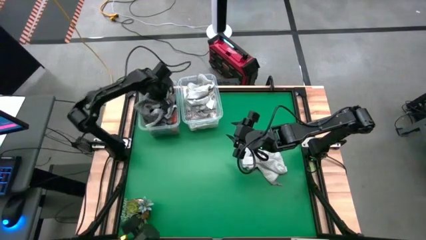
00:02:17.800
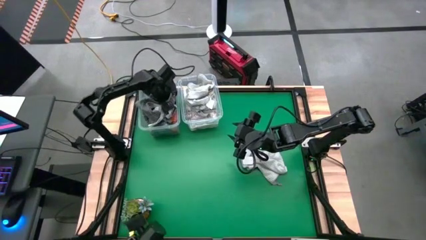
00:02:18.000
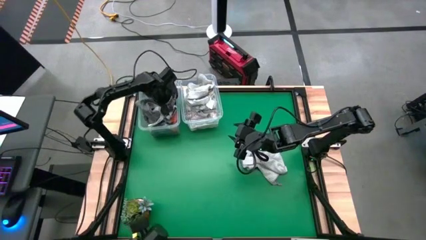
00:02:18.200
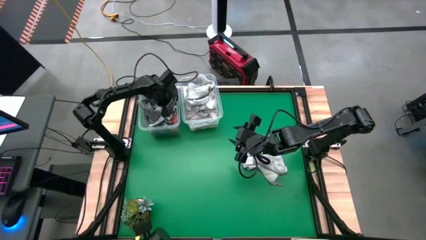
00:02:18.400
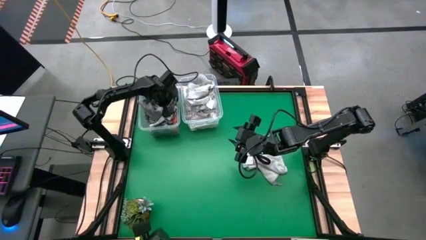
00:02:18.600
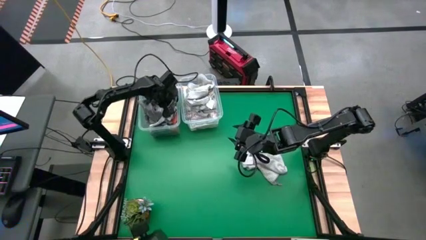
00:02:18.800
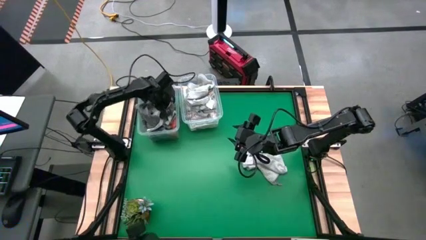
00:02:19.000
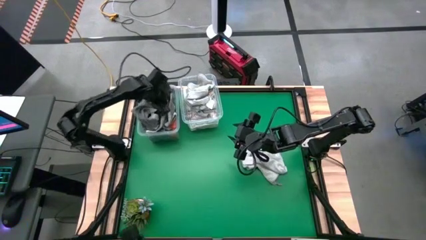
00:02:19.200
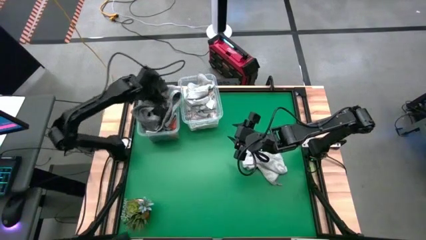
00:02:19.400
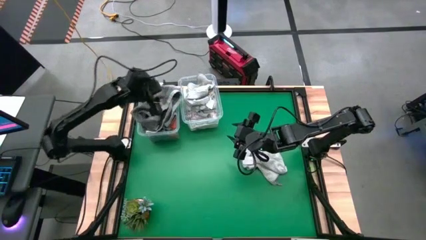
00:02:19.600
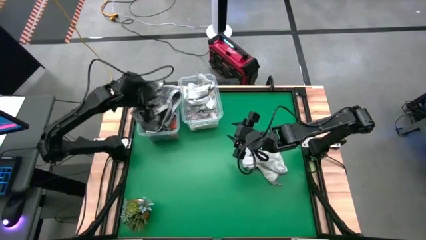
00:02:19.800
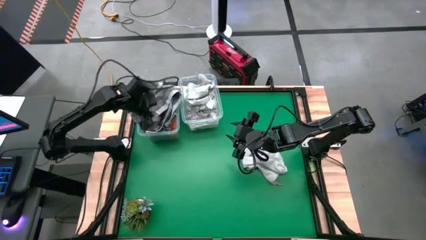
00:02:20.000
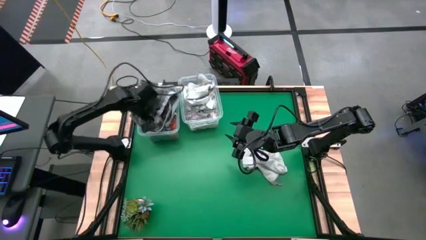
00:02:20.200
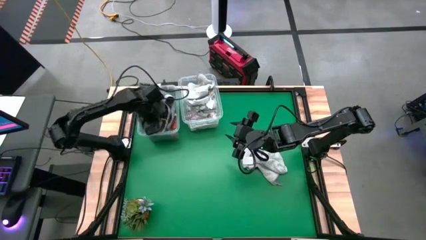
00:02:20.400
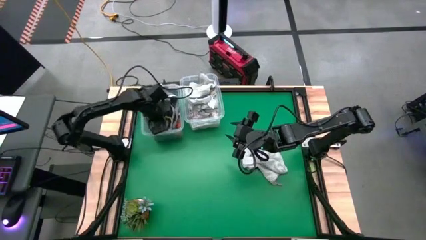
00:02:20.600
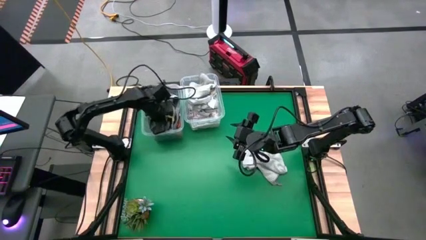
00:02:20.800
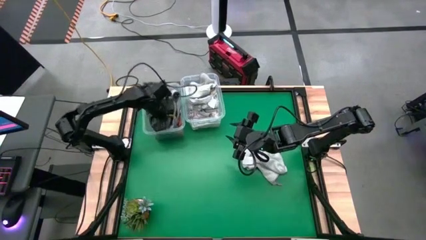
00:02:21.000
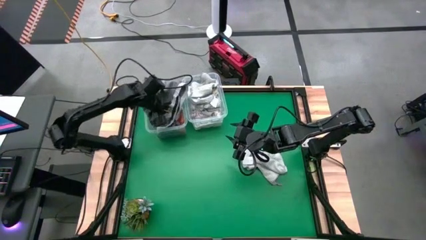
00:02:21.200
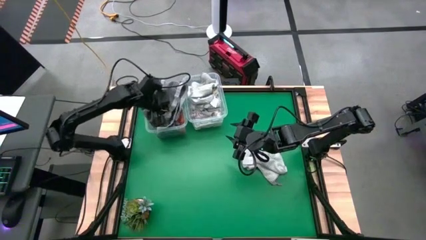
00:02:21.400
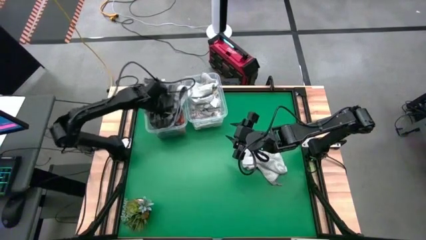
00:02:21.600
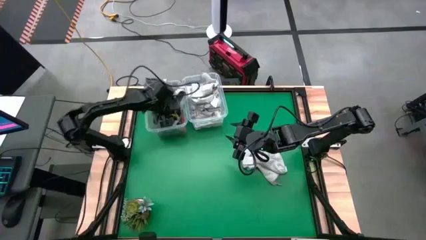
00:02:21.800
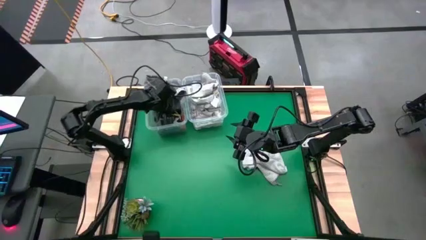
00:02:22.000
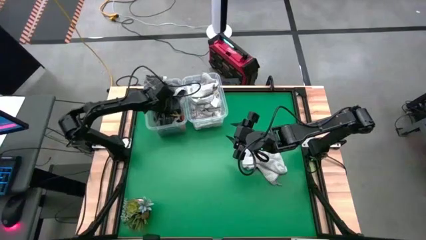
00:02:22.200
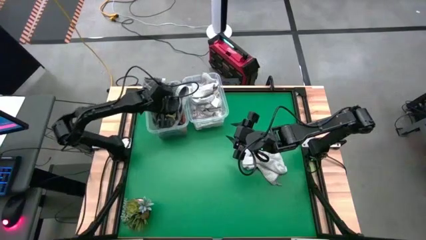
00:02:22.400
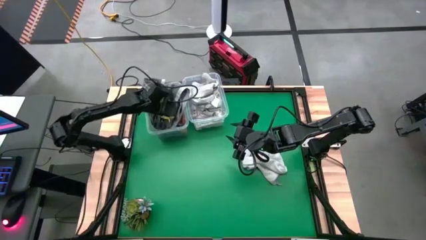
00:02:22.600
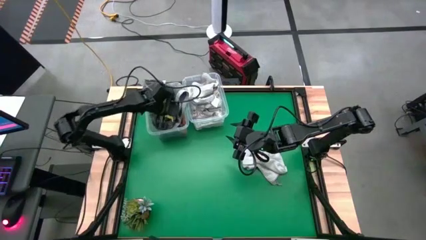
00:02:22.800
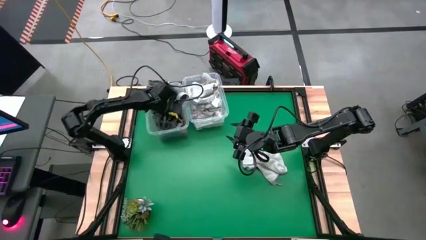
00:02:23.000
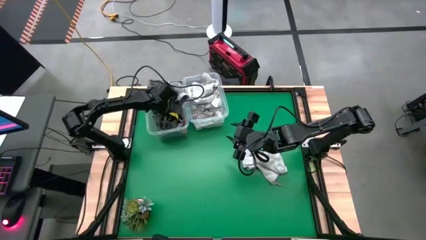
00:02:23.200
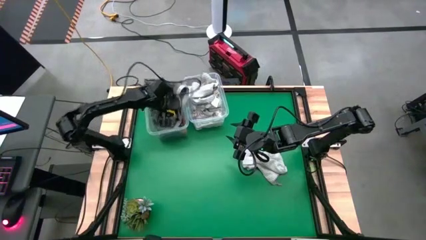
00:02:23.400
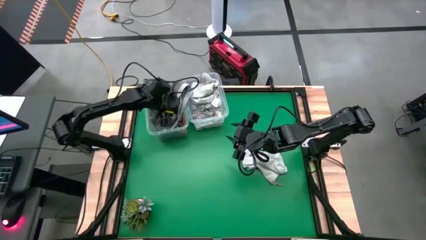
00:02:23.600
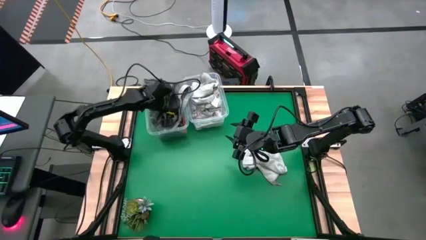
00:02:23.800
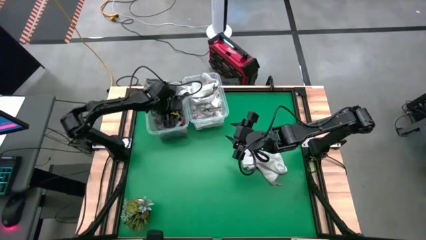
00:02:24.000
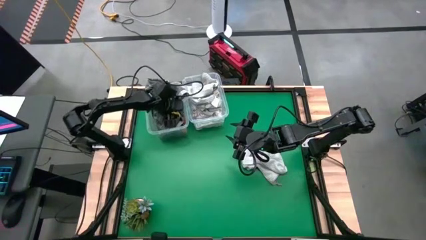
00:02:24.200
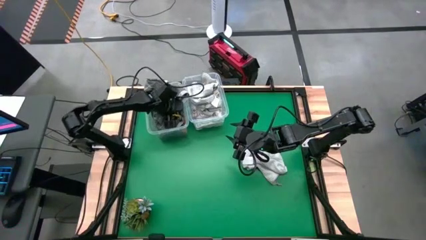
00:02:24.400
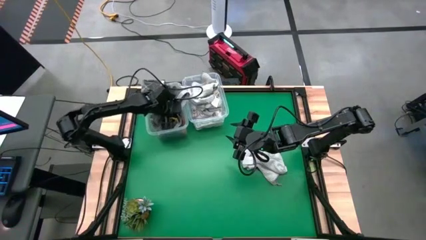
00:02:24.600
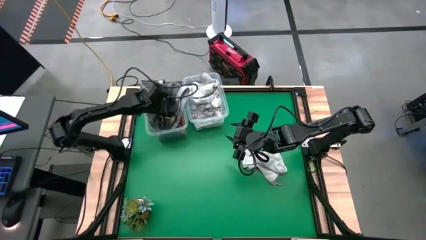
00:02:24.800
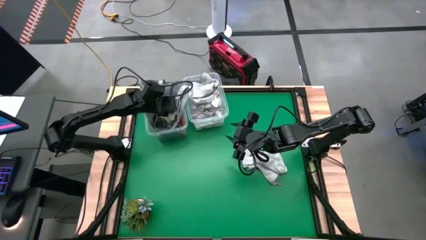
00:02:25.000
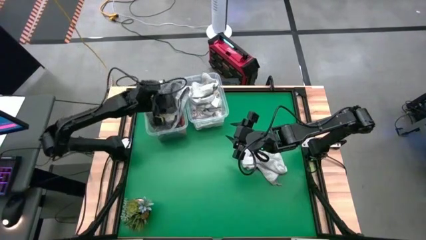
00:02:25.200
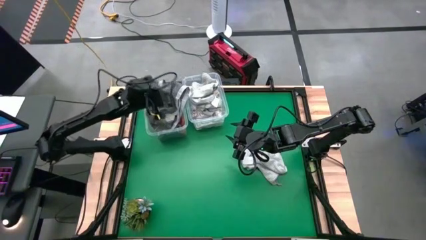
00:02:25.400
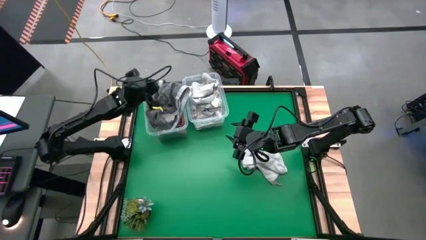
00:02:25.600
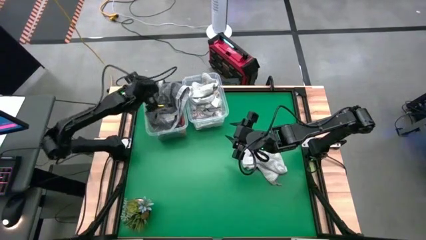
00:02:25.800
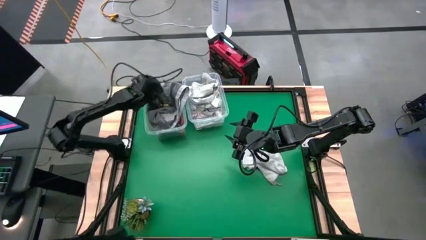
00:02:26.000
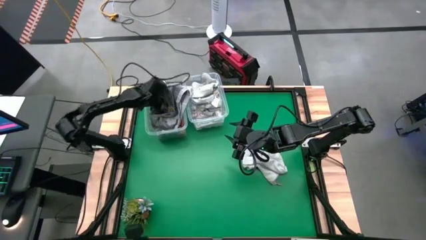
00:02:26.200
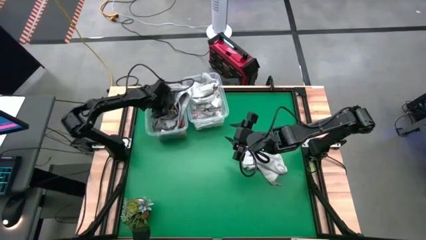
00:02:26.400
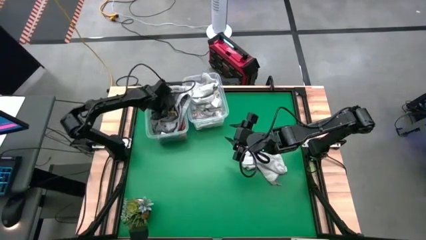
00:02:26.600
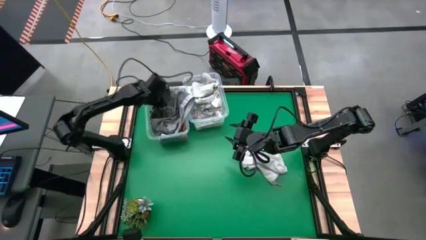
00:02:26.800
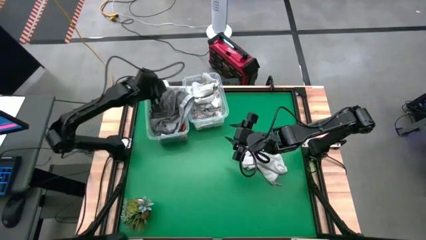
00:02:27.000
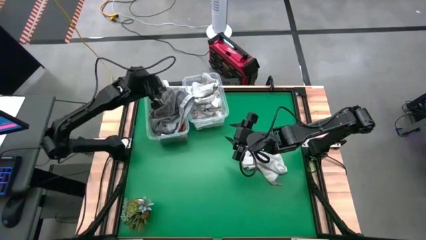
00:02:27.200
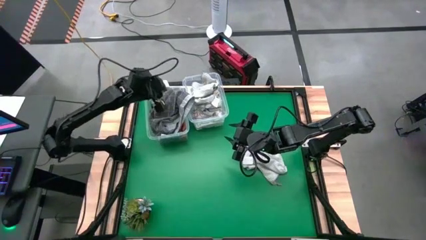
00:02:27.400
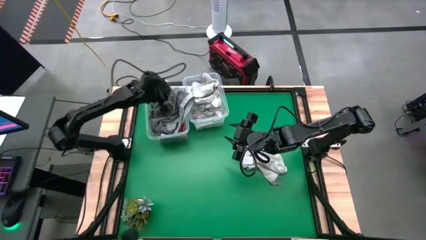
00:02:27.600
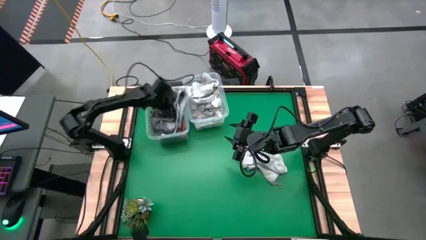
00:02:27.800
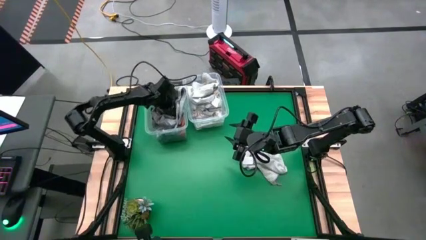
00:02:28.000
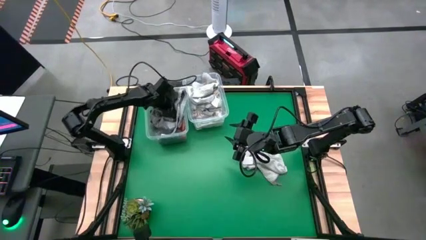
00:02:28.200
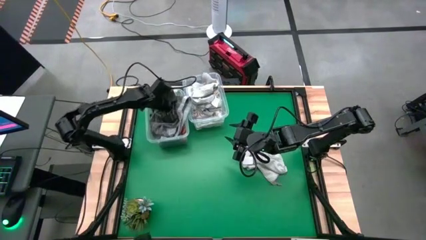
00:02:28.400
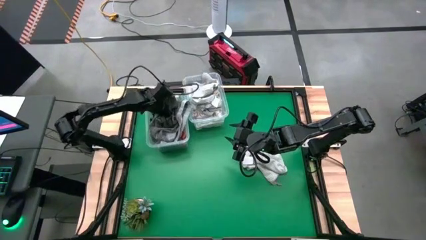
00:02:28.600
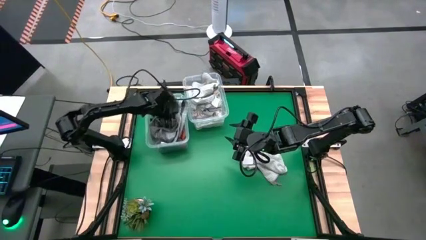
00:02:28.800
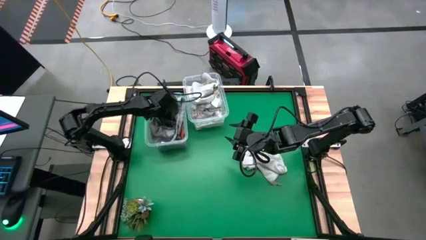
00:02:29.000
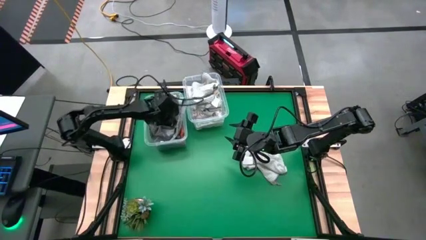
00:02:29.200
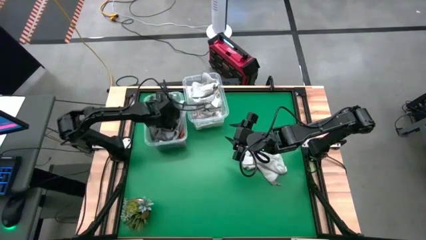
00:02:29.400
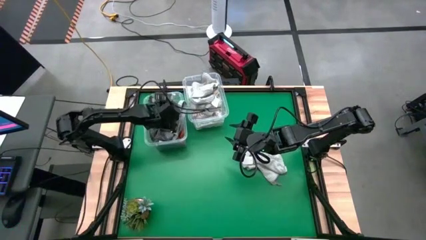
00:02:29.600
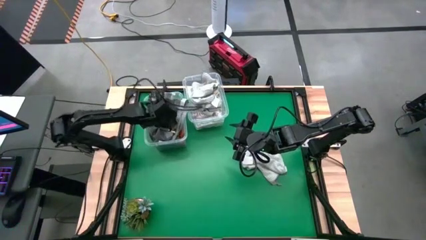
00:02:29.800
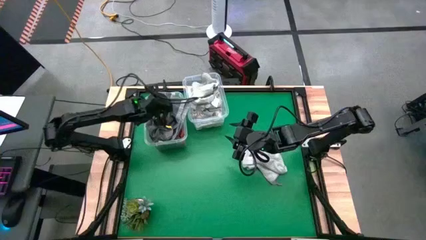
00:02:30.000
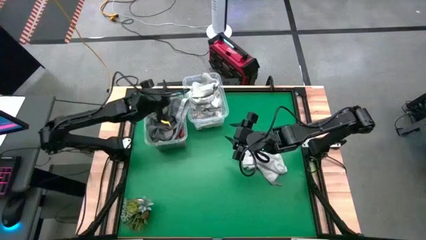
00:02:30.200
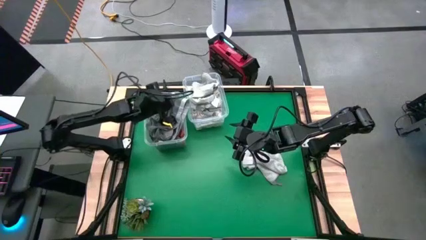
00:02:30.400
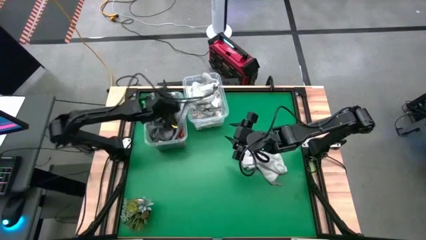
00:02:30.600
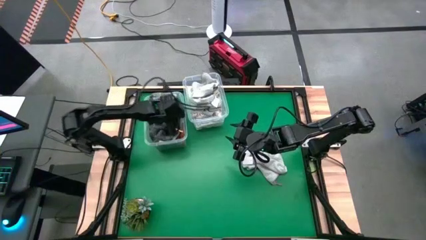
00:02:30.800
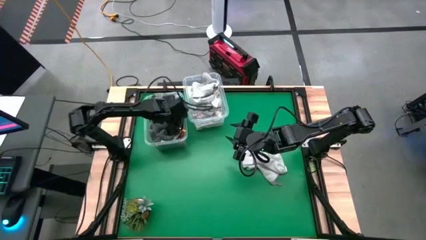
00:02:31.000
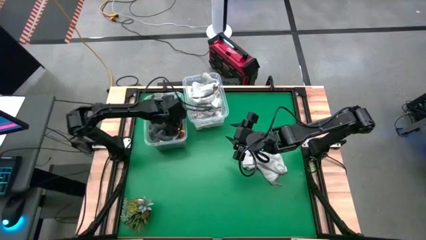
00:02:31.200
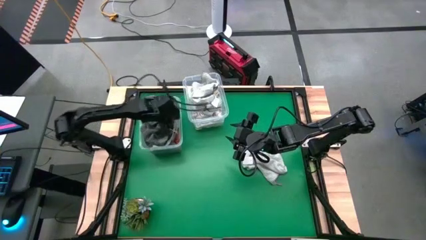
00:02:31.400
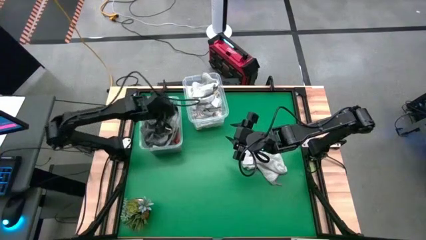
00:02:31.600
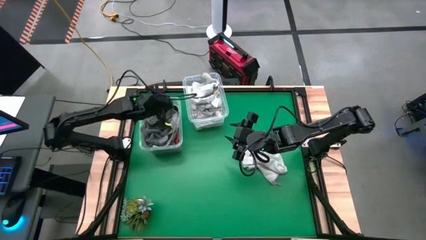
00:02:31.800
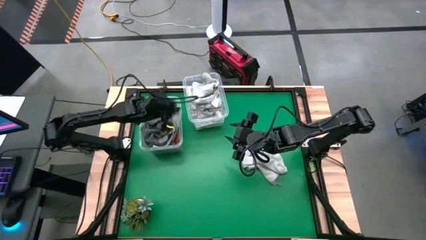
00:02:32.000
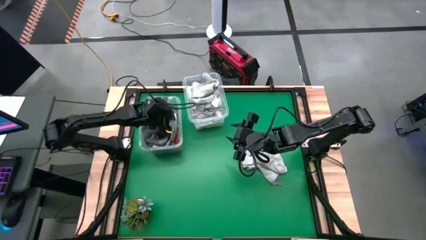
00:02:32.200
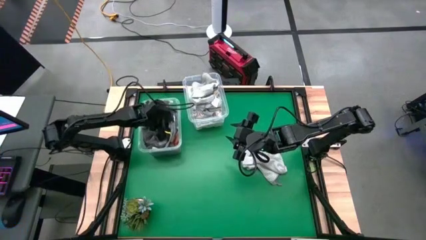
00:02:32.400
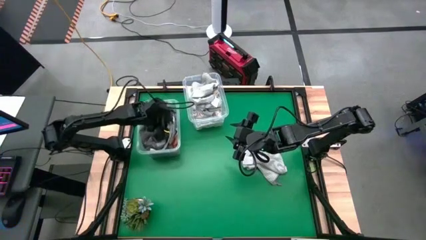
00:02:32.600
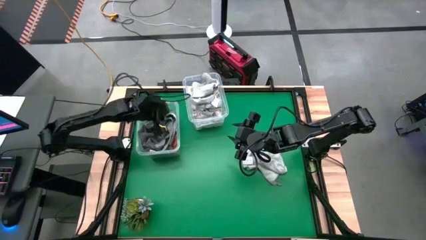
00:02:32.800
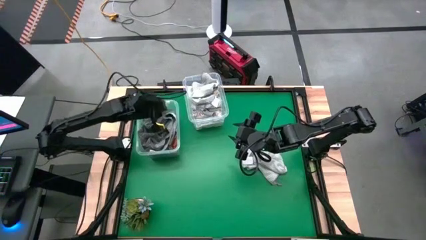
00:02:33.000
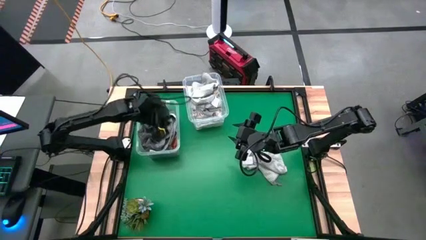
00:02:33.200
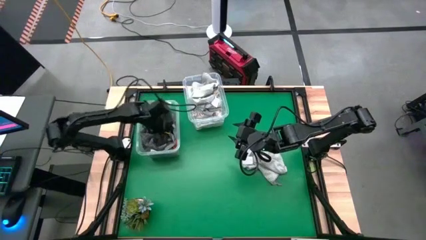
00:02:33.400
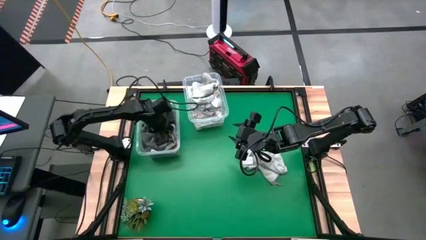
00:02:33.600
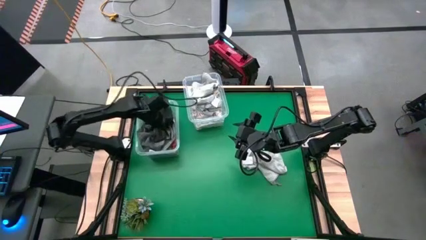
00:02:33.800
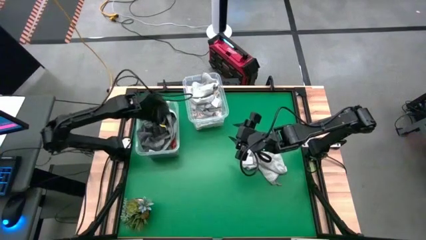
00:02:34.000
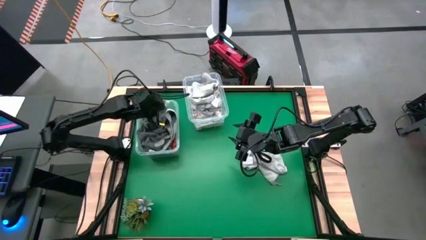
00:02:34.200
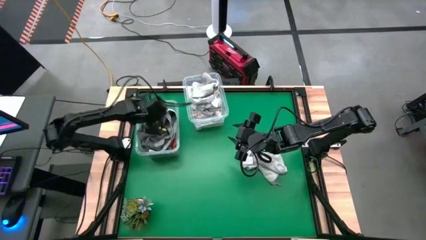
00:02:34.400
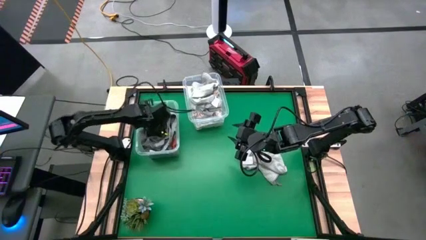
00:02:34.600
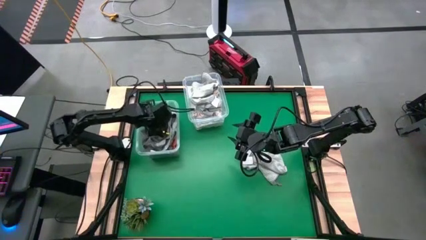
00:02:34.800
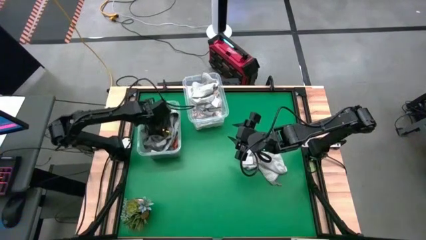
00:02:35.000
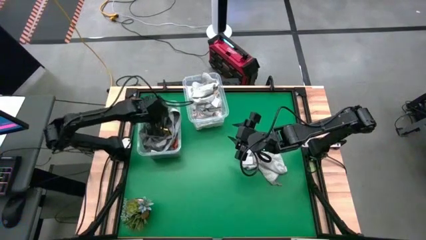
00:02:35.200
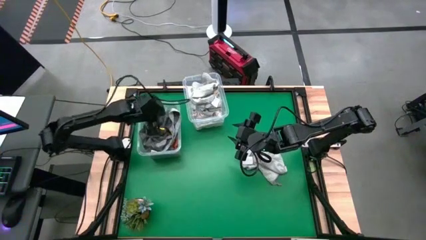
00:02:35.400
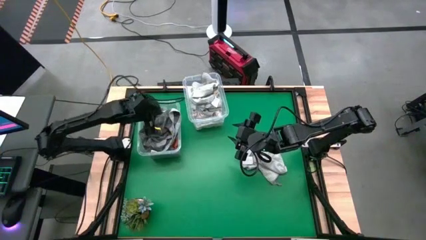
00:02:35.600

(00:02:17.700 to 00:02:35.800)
Task: Sort towels by color in basket
Put the gray towel into the left transparent bin
